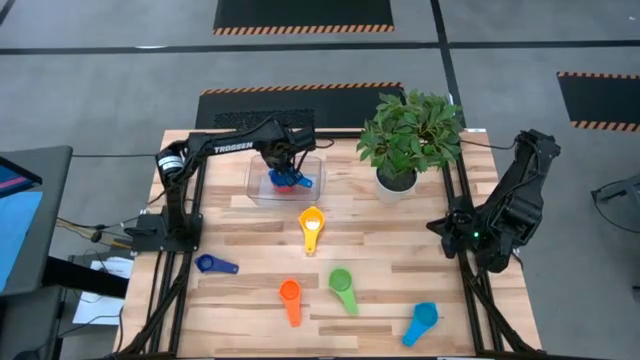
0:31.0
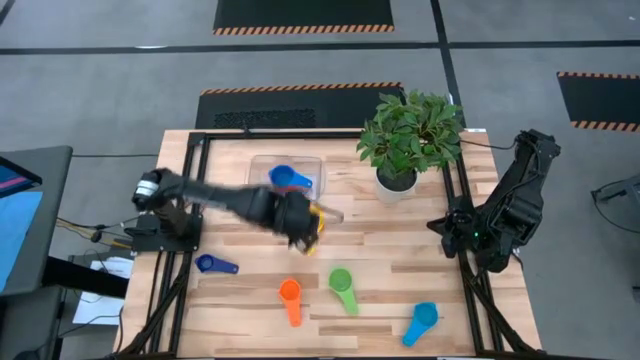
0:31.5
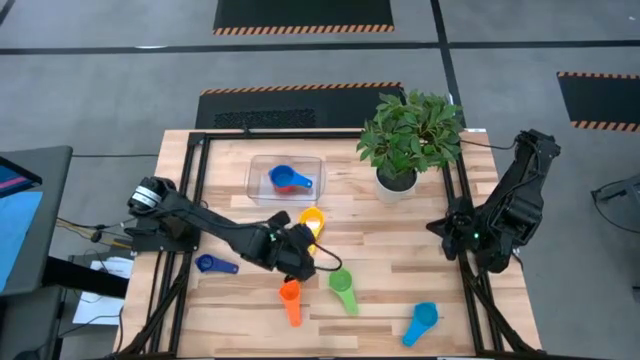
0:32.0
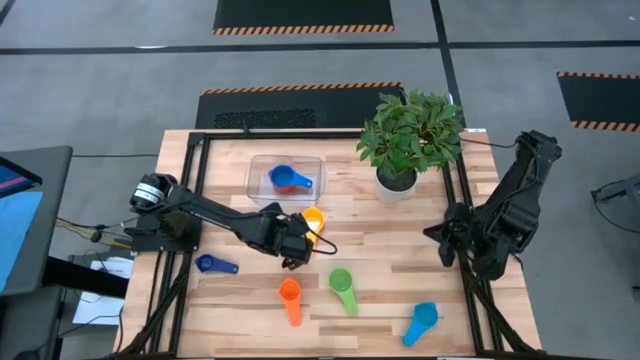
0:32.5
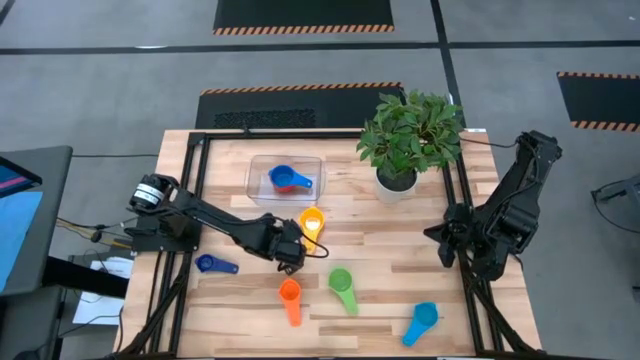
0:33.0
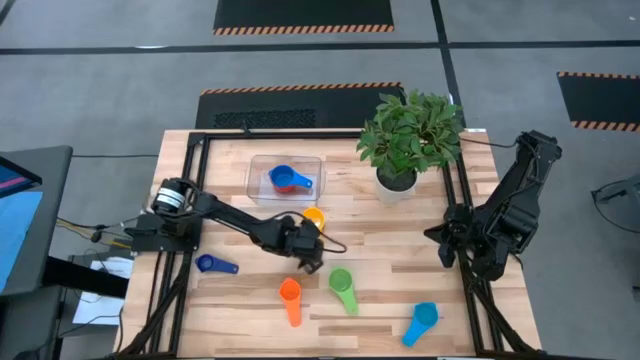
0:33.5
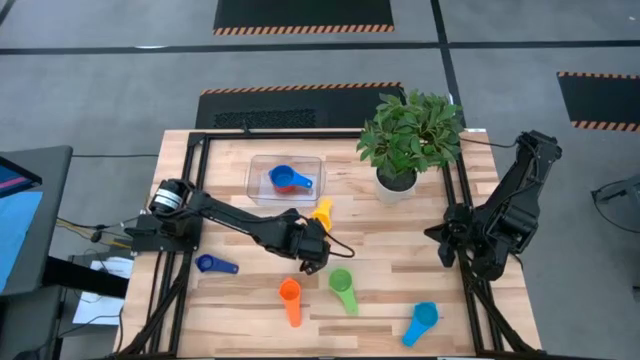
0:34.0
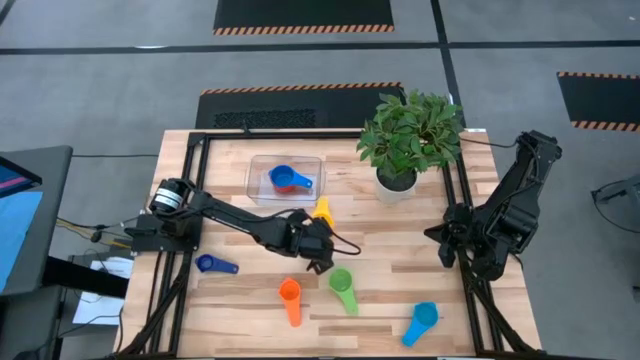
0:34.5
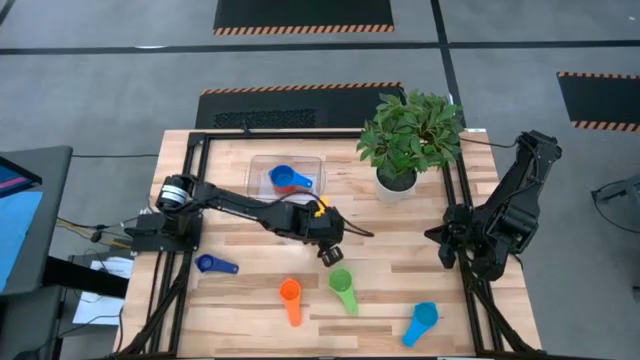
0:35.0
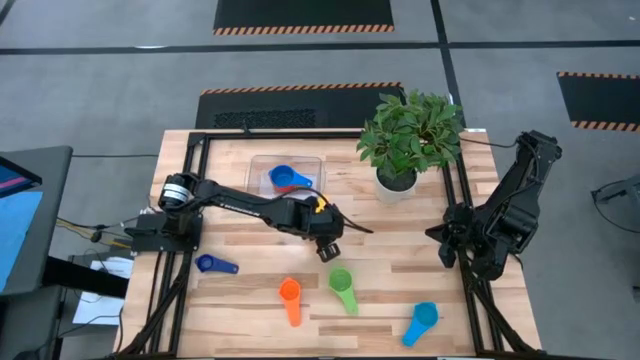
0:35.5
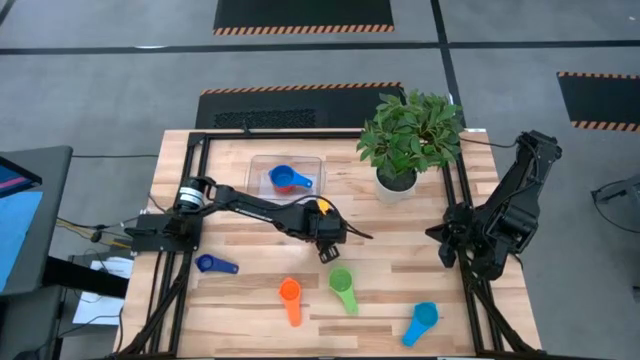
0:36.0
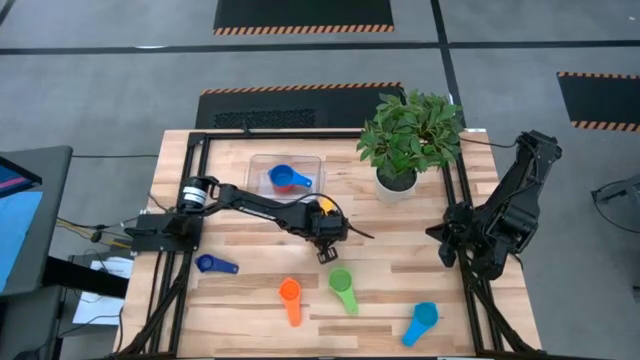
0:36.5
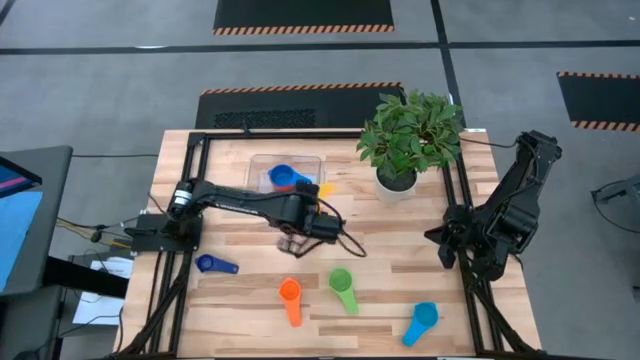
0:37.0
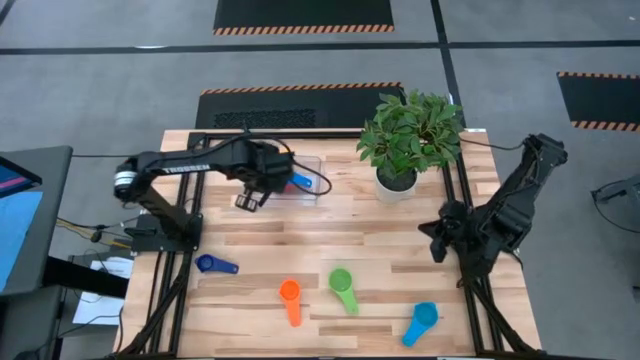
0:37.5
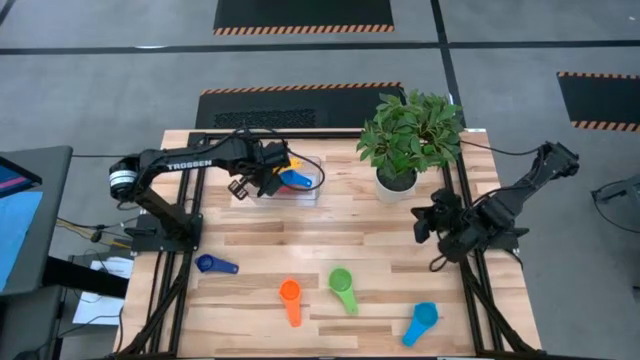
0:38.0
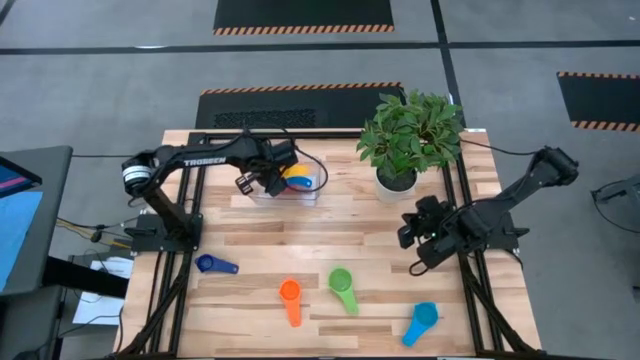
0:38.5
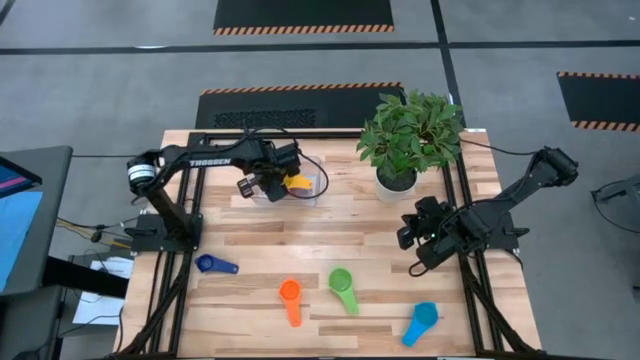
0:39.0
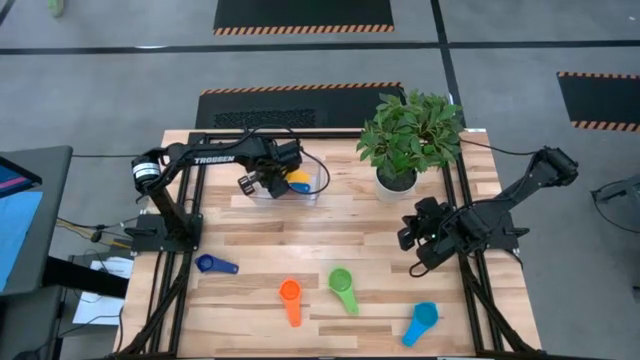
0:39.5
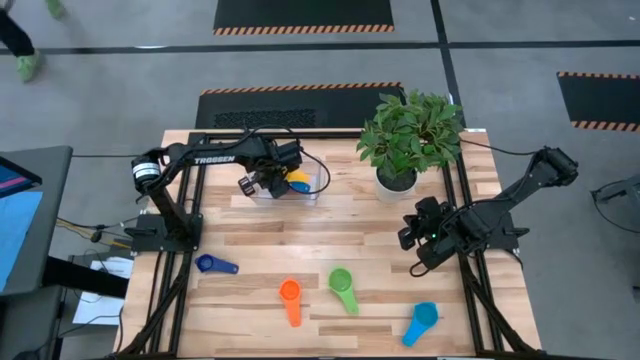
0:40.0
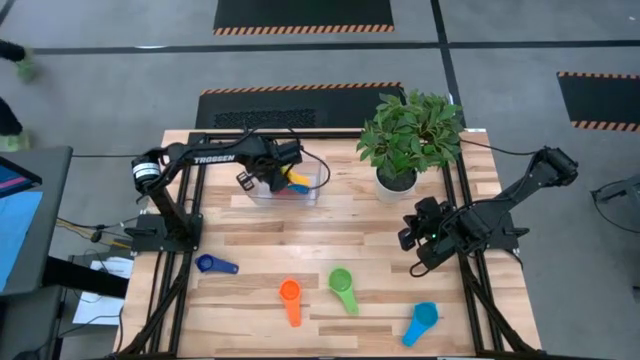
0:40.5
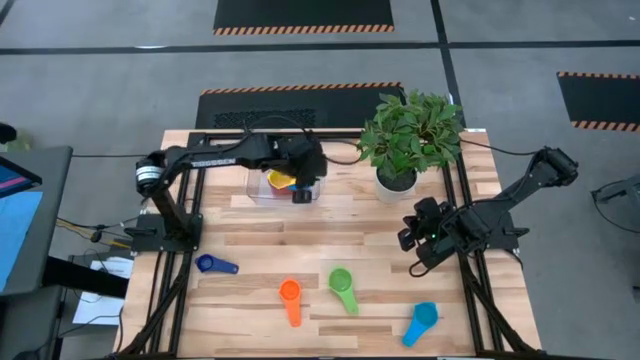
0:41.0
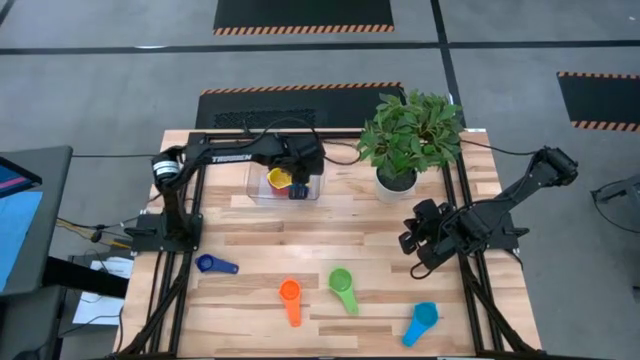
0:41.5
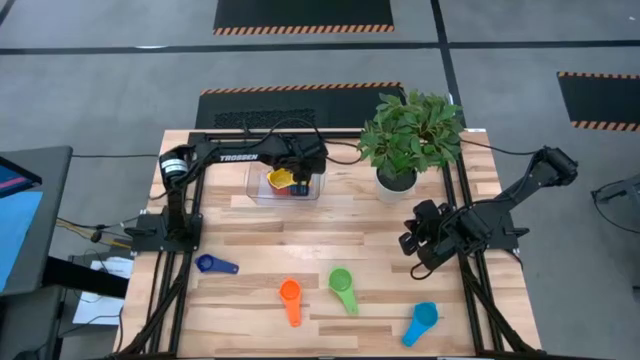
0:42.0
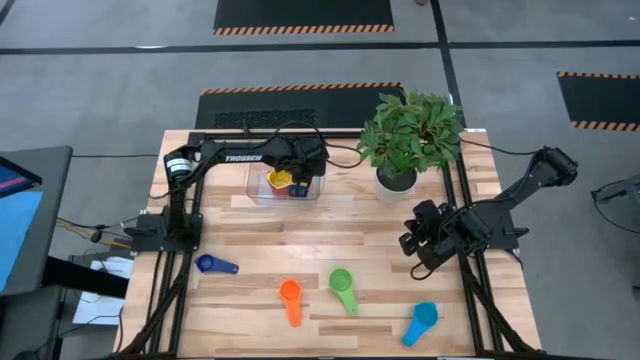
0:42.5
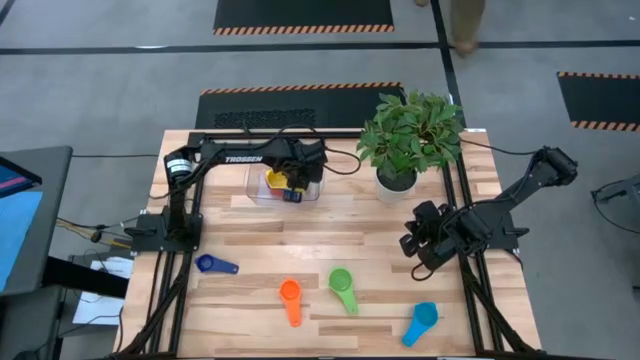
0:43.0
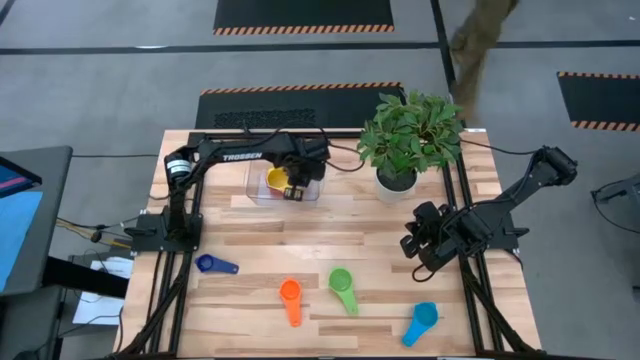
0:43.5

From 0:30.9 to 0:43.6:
Task: Nest measuring cups in basket
Stack the yellow measuring cups on top of the blue measuring cup in the transparent bin

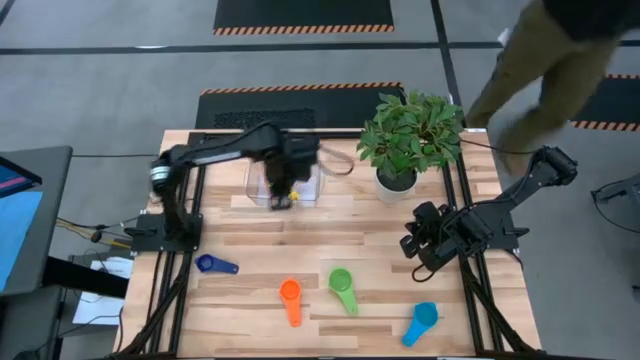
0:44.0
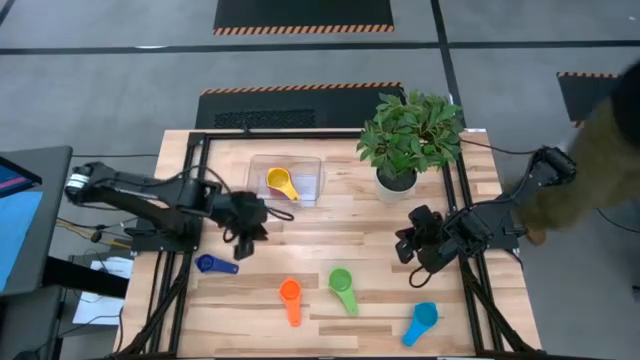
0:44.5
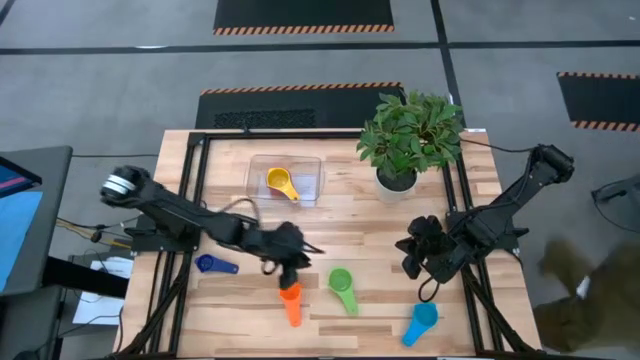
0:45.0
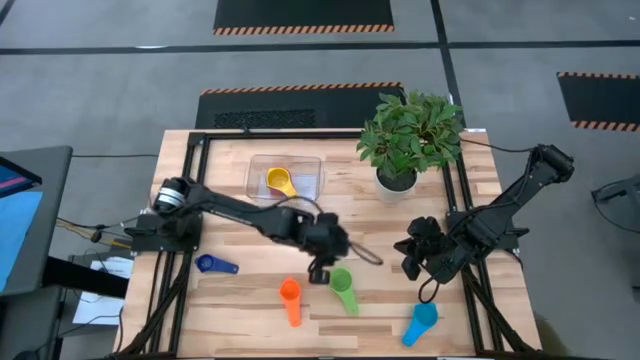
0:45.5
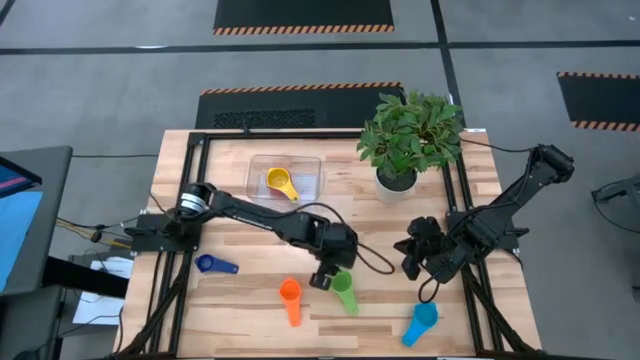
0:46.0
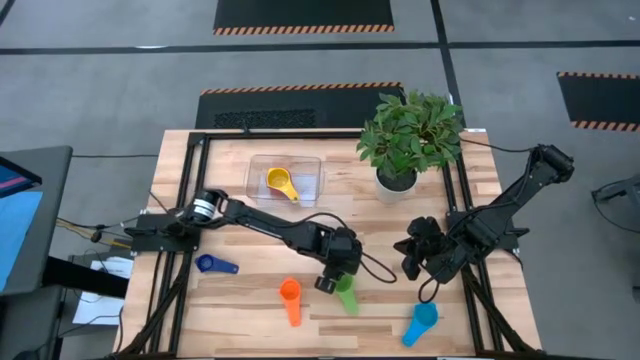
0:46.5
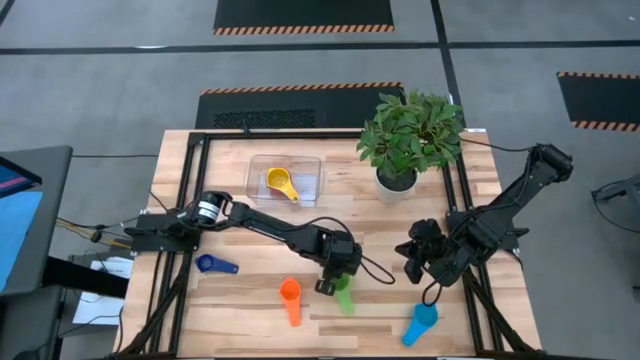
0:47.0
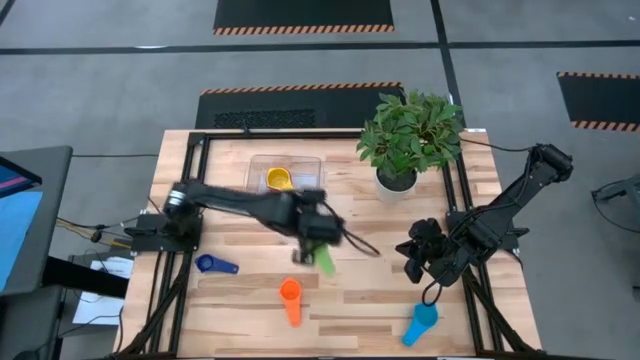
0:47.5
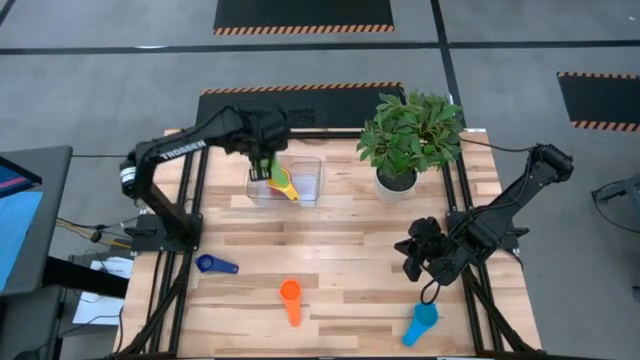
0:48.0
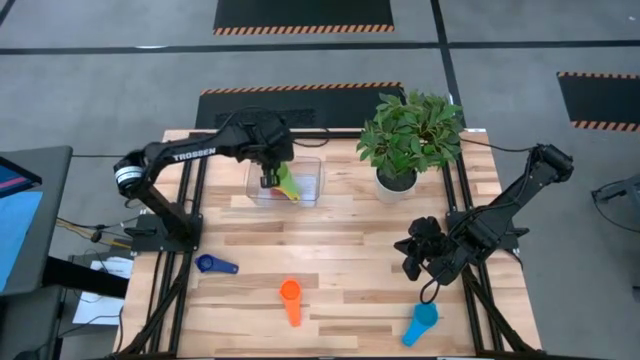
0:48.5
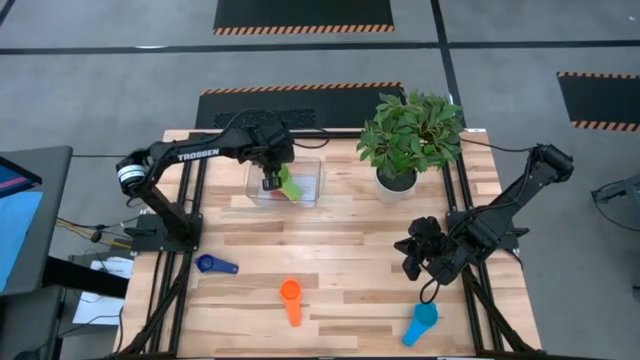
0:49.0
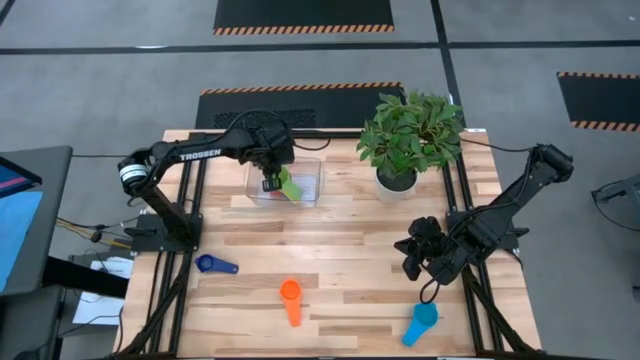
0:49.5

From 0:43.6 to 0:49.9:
Stack the green measuring cup on top of the yellow measuring cup in the transparent bin

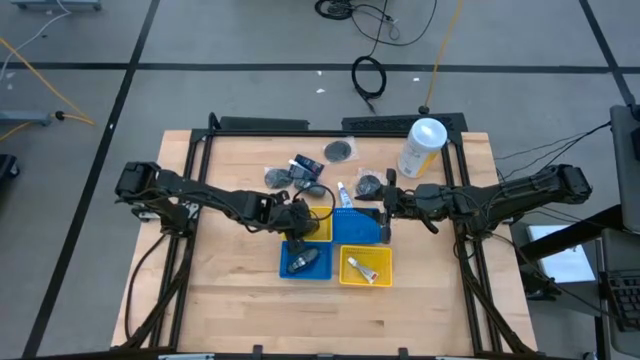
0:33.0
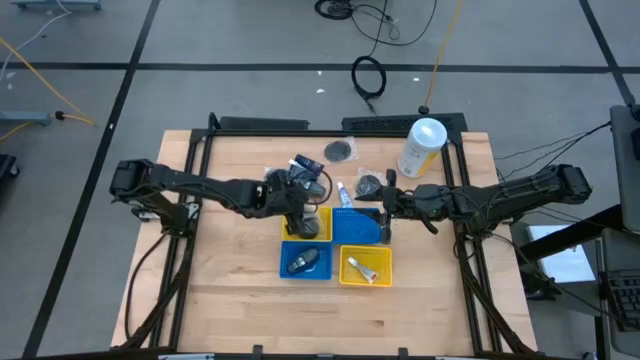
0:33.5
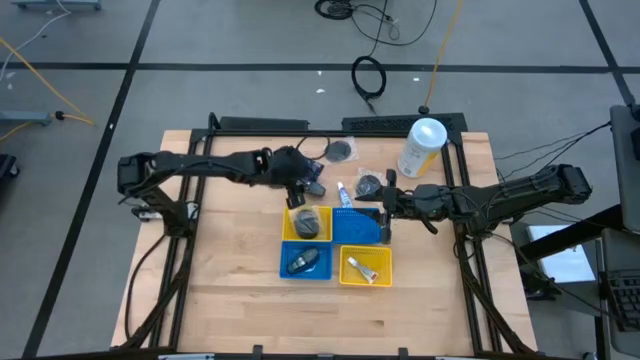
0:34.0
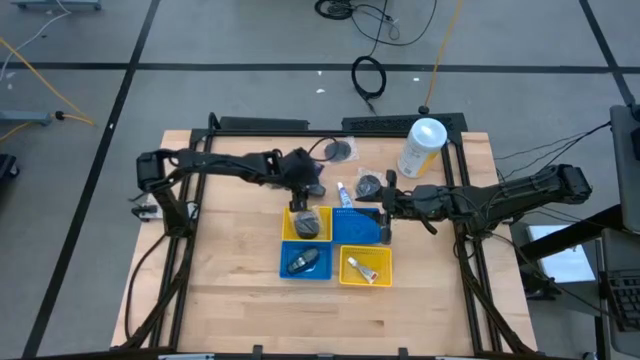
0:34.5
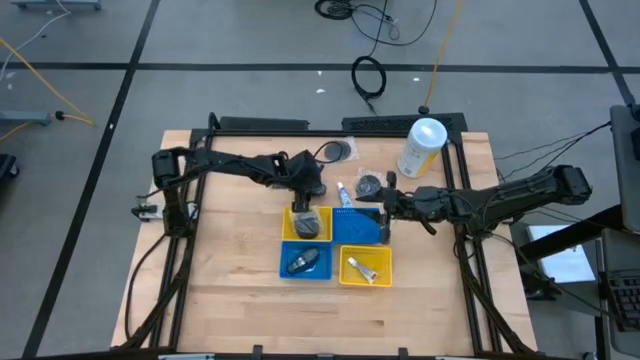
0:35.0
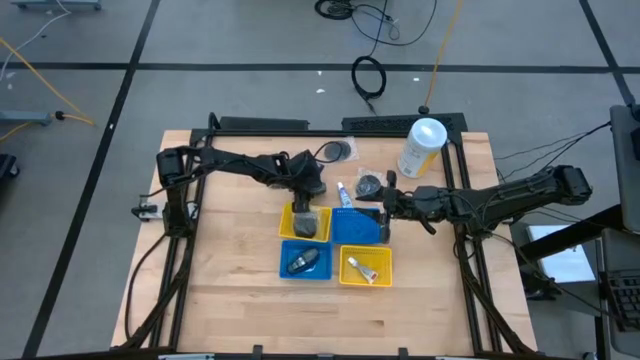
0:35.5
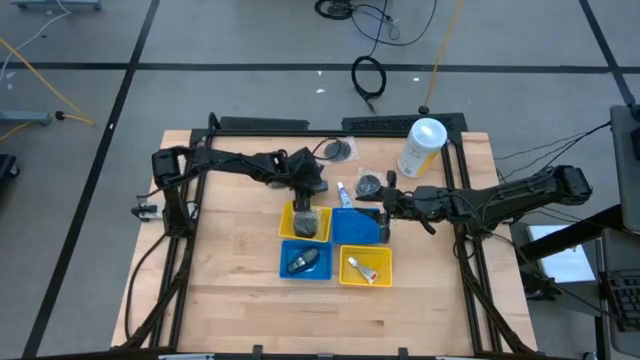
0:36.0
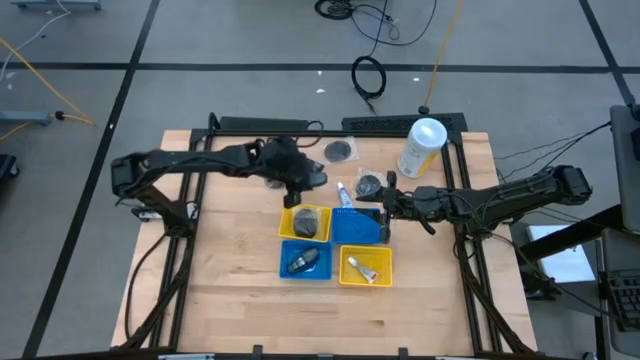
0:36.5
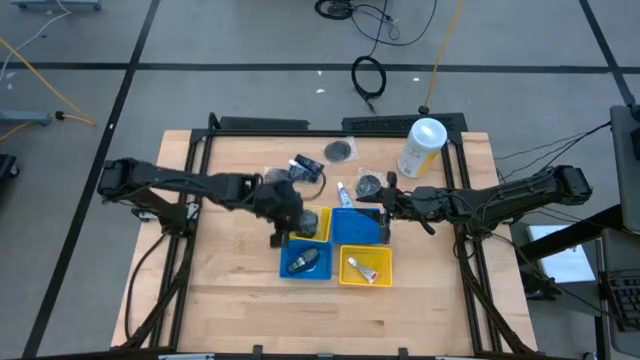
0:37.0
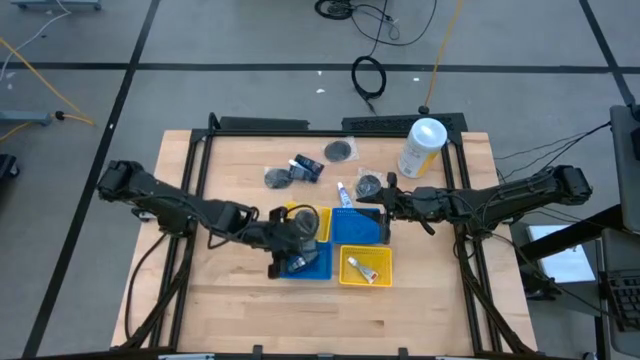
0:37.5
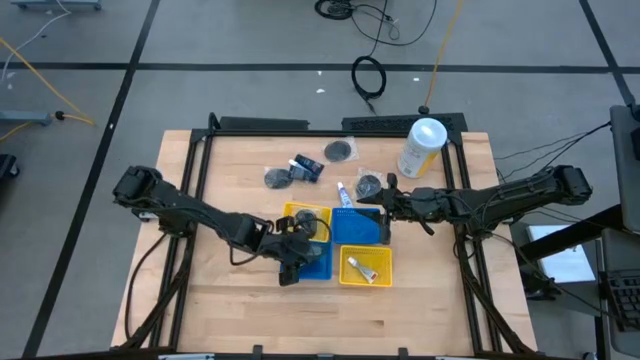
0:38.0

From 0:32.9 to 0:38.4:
Task: Pick & Place Travel size toiletries
Put the black deodorant into the bottom blue basket
